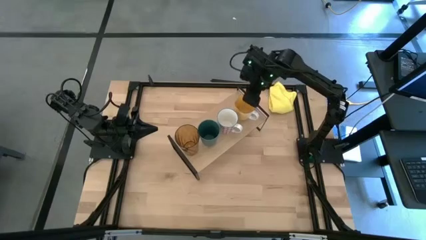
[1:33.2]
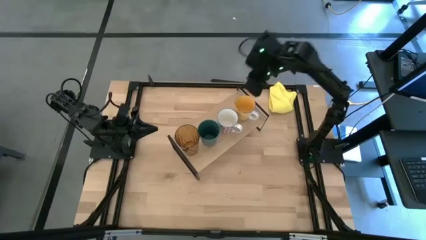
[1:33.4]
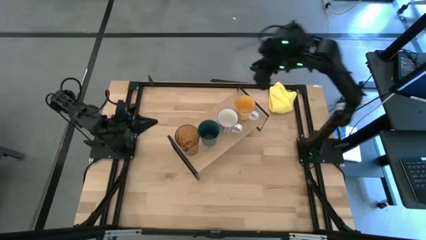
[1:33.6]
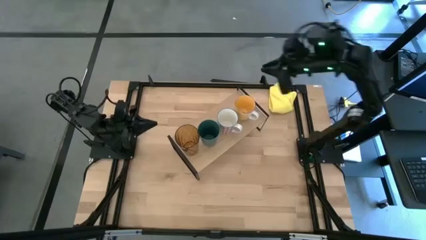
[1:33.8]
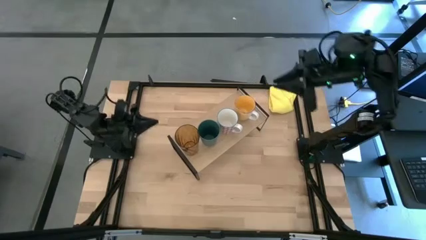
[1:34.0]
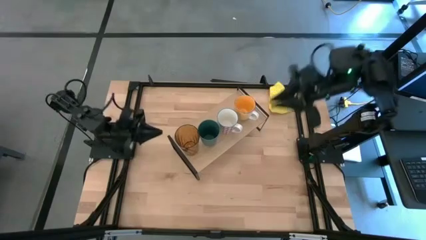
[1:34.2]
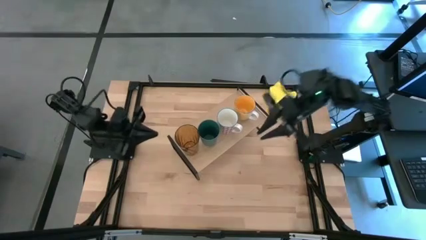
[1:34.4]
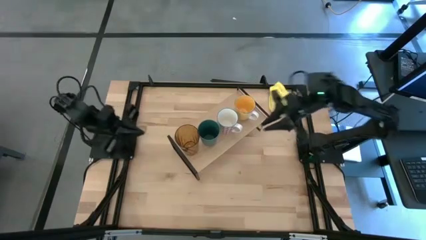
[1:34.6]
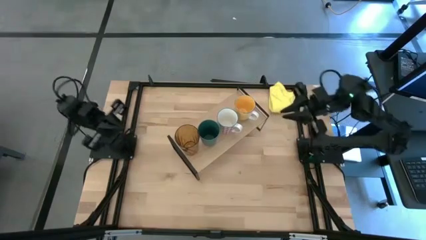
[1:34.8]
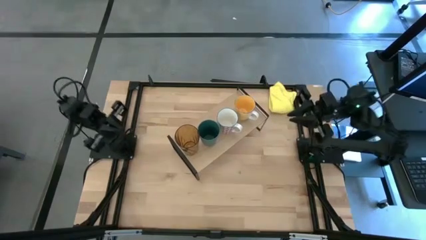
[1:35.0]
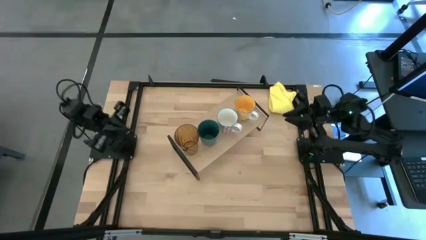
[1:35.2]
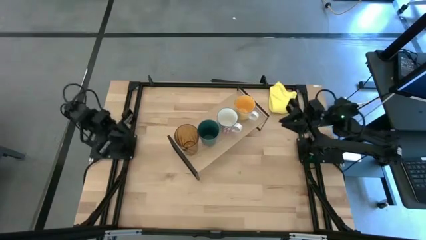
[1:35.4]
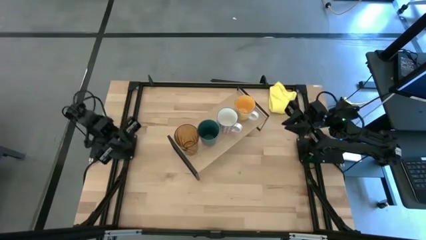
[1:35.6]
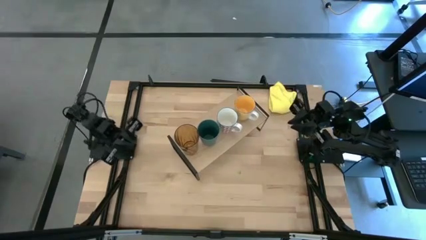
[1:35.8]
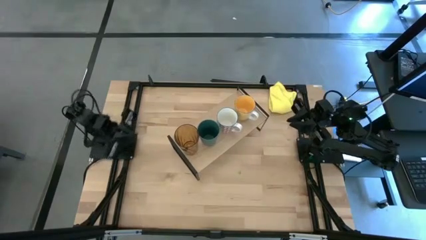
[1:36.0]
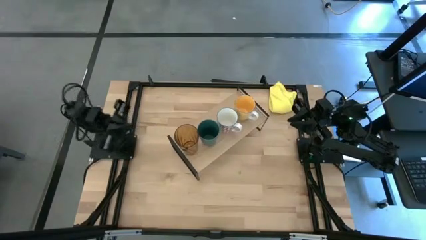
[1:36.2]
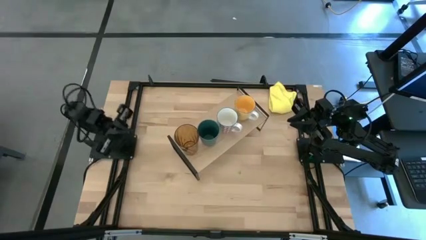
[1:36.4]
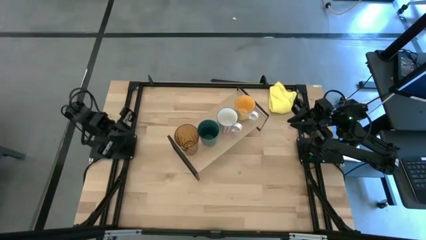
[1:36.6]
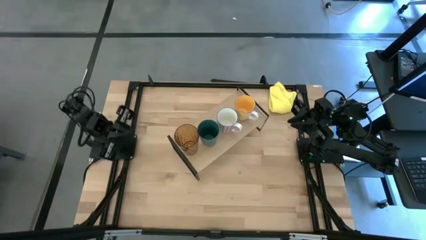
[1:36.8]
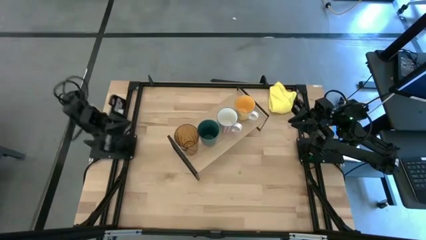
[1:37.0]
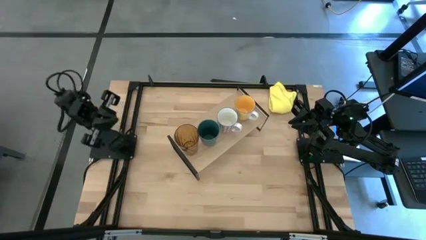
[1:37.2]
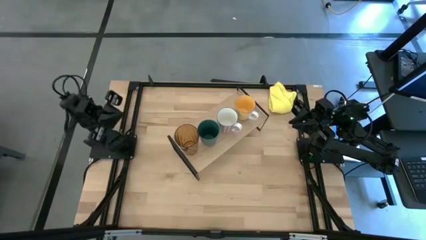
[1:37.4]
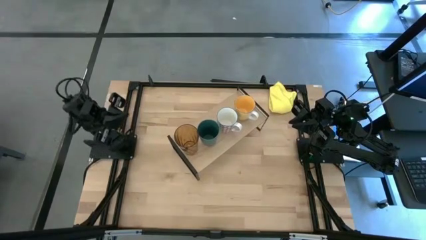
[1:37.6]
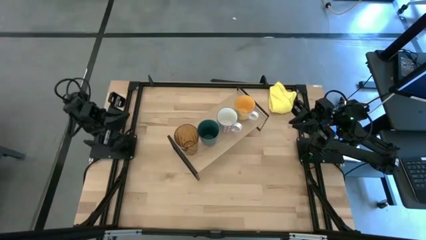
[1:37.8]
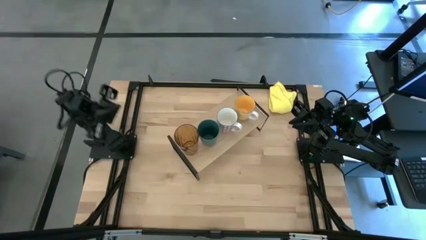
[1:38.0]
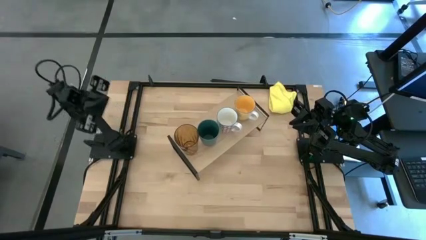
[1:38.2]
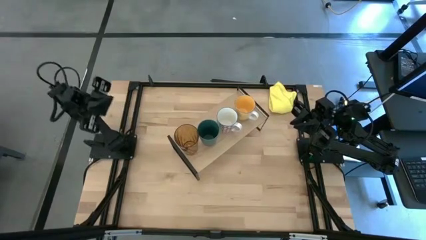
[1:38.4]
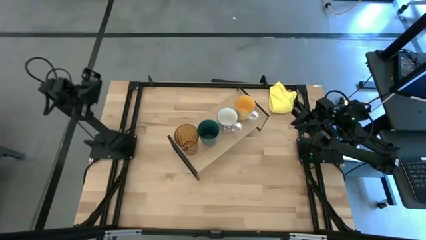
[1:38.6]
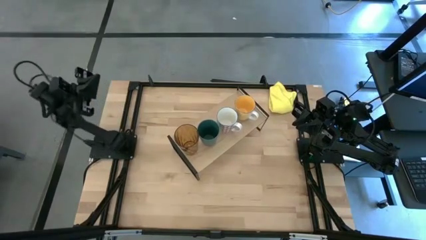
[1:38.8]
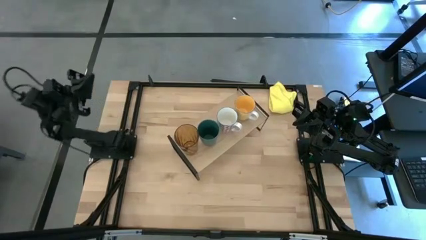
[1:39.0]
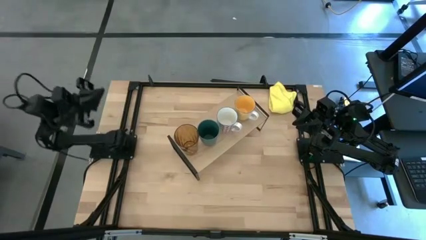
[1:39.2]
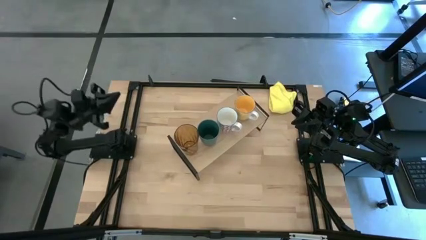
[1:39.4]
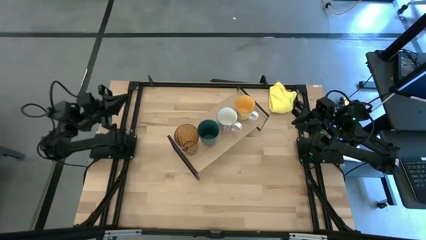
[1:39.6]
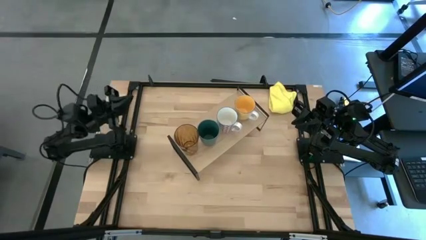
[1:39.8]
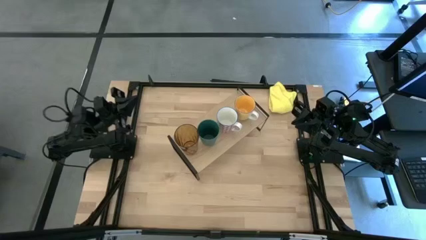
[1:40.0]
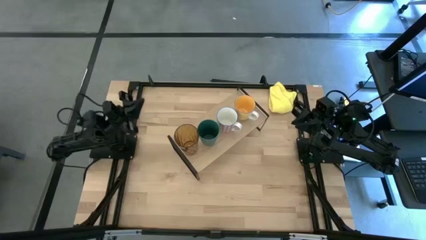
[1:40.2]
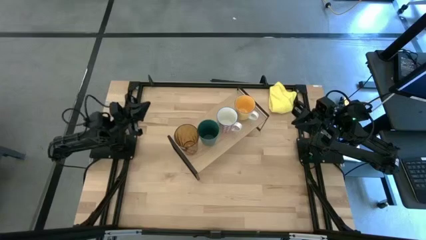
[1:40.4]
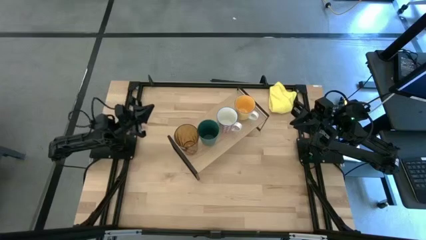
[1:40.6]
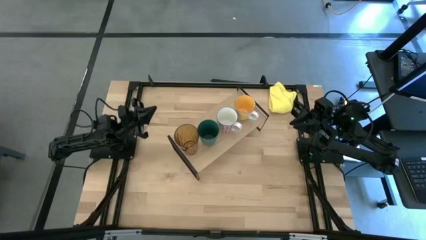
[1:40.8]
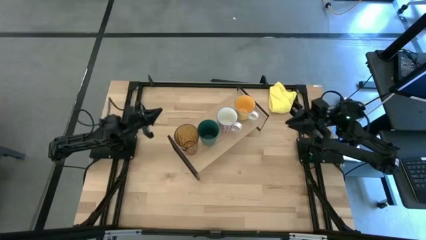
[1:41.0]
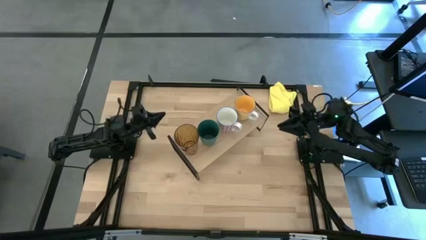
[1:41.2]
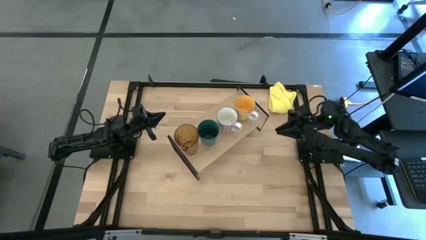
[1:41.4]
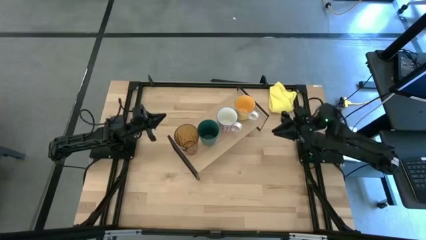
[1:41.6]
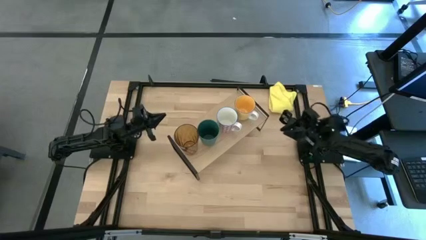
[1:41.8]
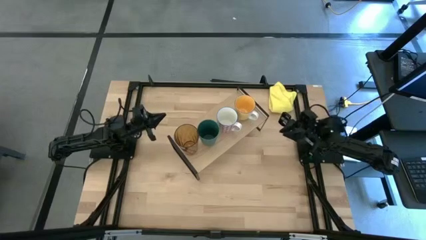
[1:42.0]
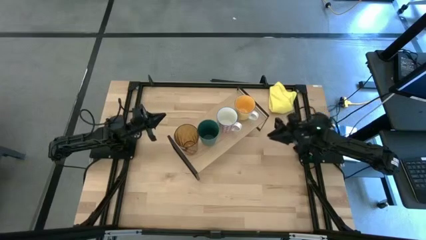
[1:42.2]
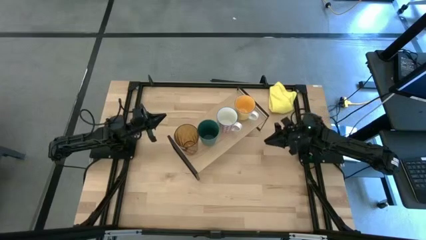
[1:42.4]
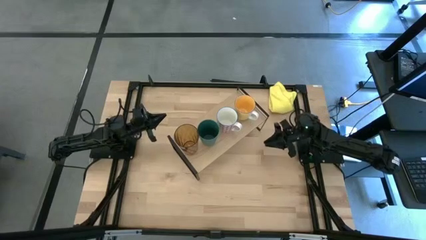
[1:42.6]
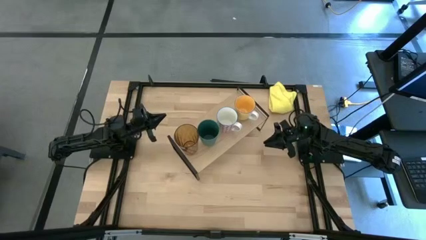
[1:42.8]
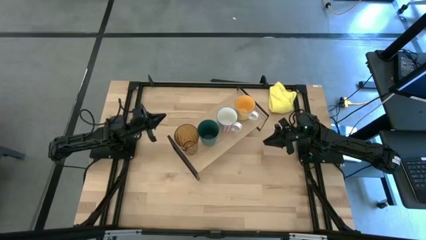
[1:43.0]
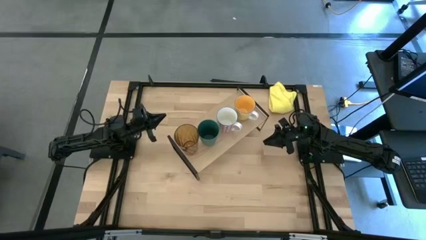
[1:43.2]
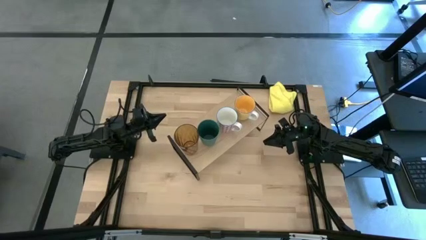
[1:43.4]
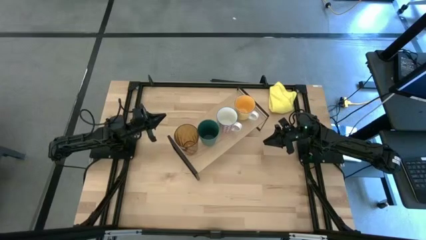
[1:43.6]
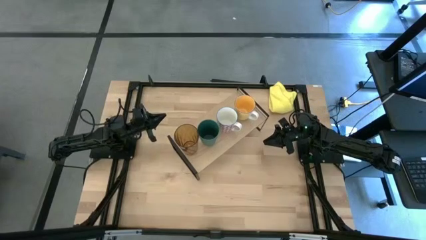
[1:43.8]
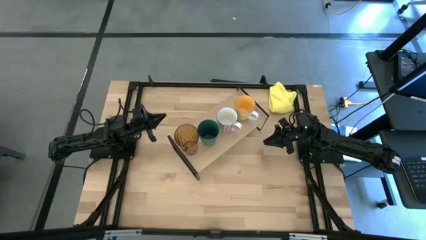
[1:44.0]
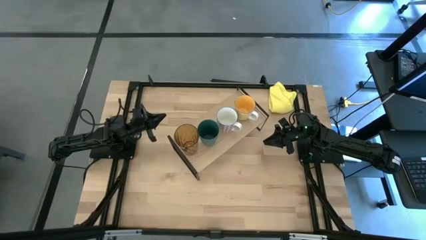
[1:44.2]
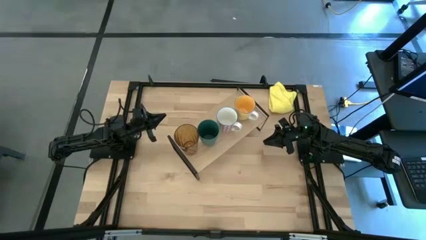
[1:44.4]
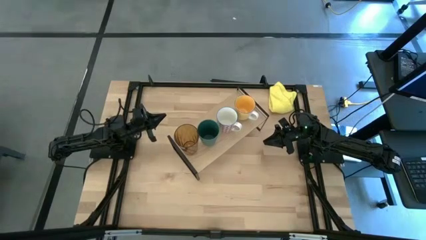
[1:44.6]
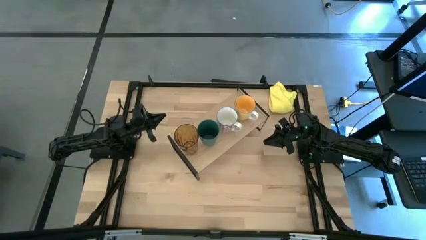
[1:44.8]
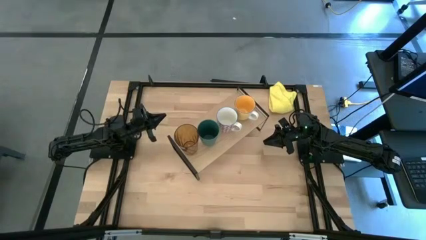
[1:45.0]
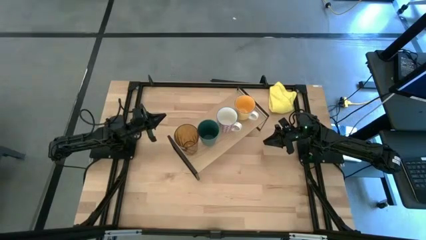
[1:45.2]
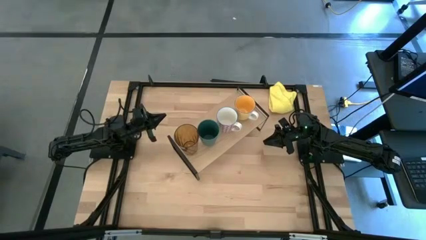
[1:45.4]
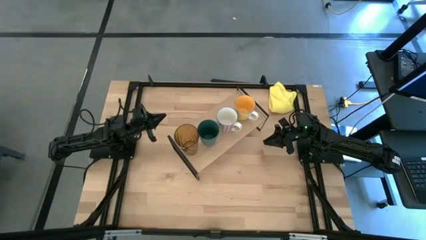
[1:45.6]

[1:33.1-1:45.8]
Task: Stack small to large cups/mugs on shelf
Return to Home Position

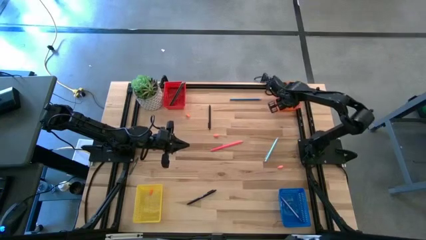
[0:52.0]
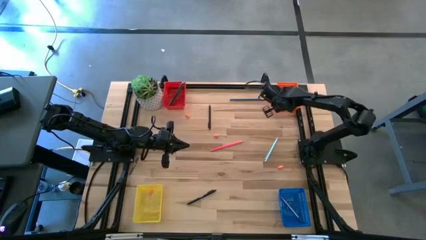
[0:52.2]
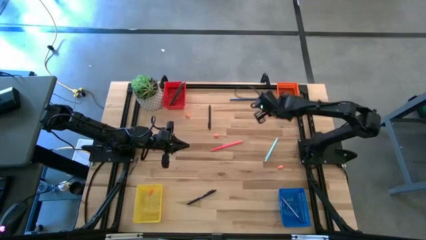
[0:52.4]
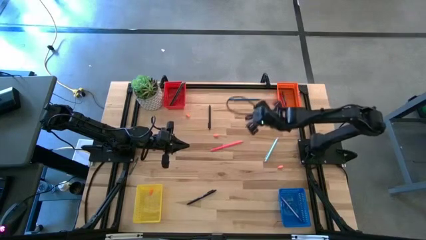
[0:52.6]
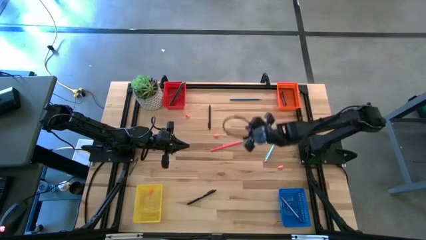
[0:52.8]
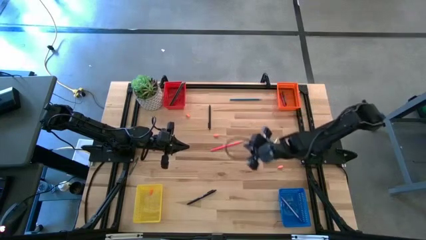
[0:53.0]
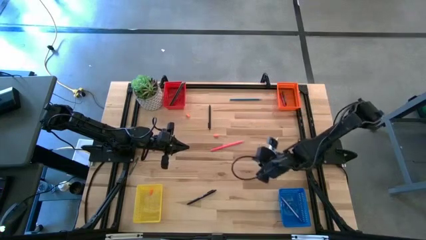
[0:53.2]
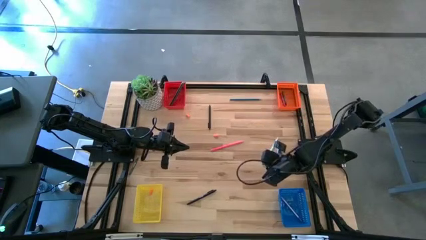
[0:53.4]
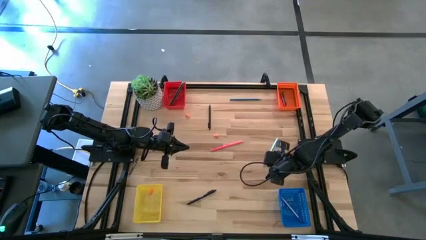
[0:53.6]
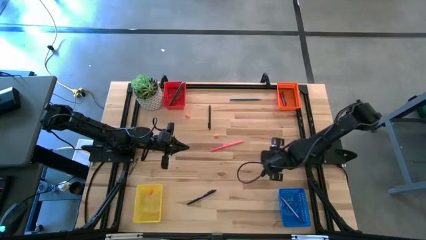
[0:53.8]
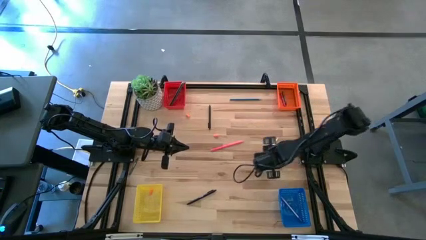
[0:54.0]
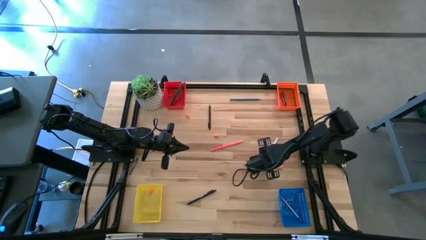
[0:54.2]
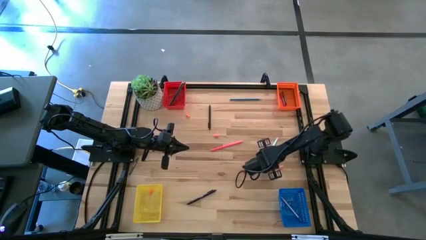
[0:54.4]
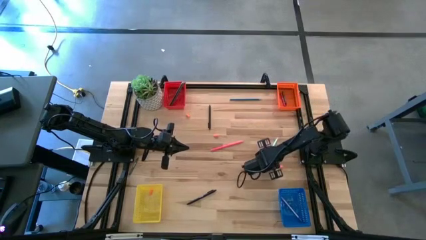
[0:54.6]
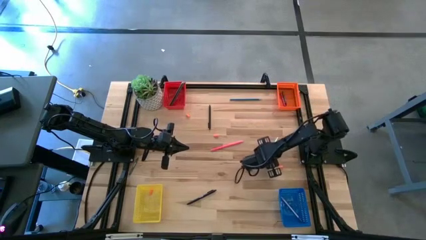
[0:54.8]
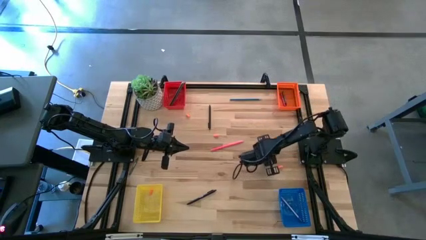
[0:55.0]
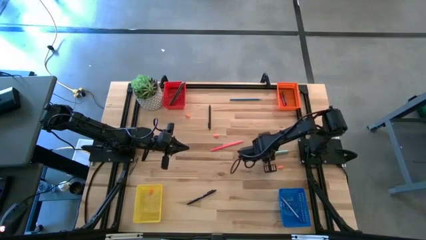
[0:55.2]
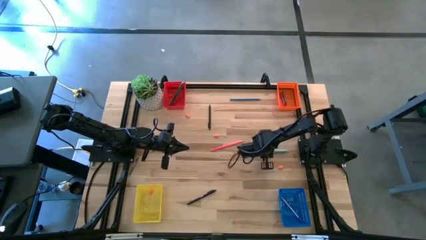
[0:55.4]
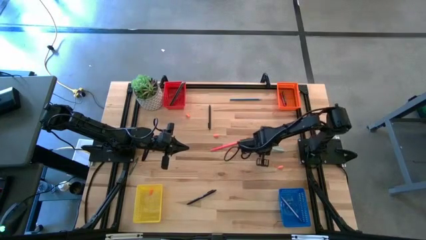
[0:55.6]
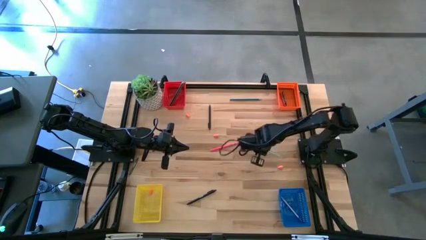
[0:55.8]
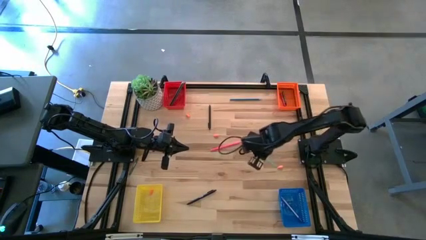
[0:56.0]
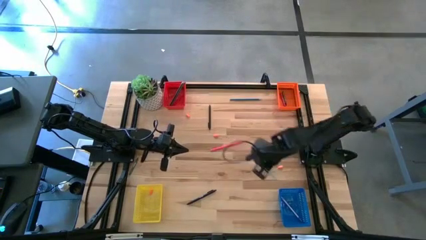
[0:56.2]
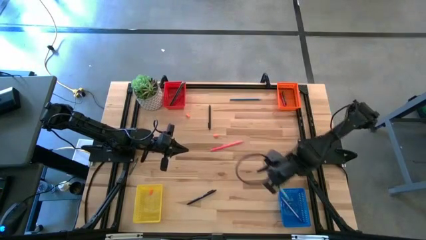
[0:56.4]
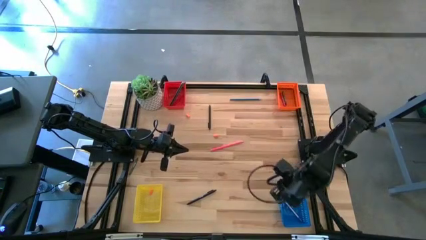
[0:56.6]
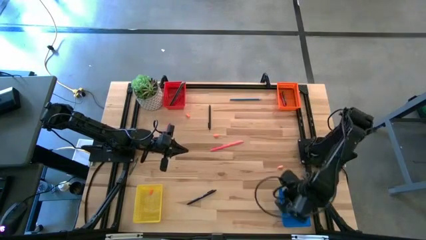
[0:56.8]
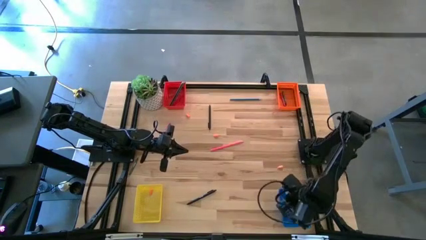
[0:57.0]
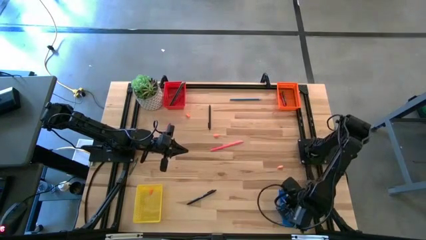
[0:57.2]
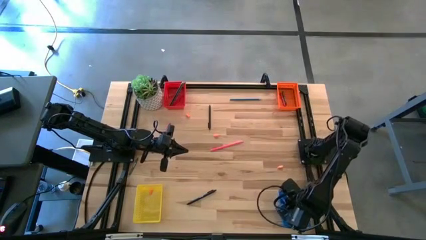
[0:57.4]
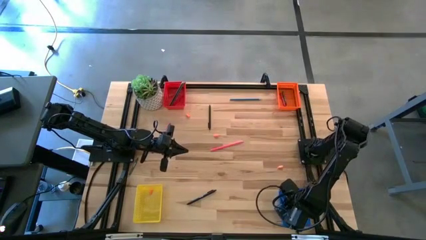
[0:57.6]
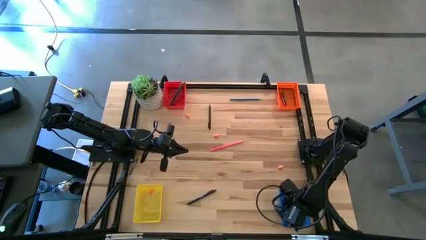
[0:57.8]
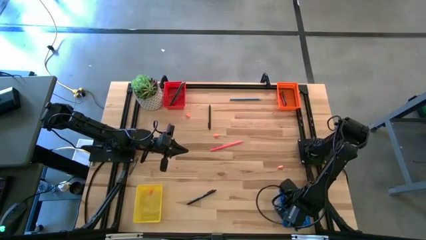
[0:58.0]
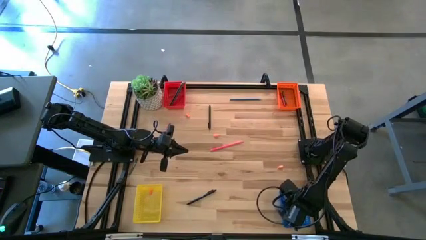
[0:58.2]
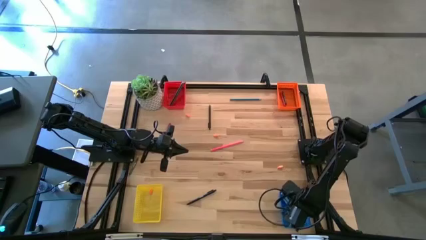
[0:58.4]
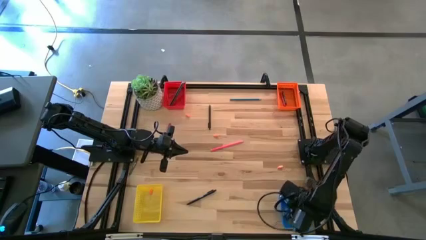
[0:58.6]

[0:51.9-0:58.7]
Task: Sort crayons/erasers/pens/pencils in bins
Put the blue pen into the blue bin
